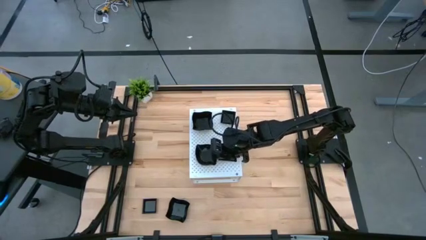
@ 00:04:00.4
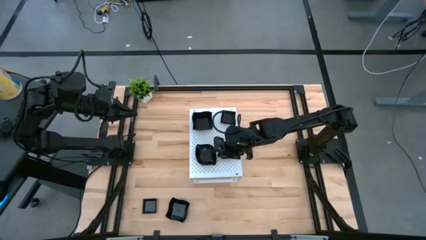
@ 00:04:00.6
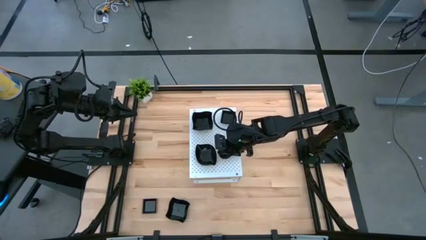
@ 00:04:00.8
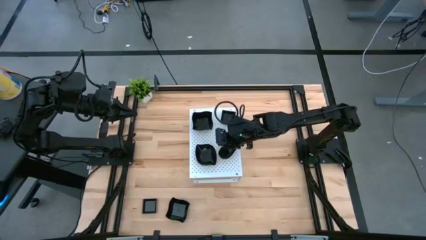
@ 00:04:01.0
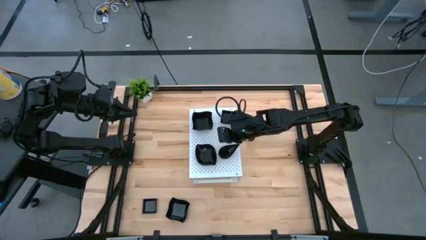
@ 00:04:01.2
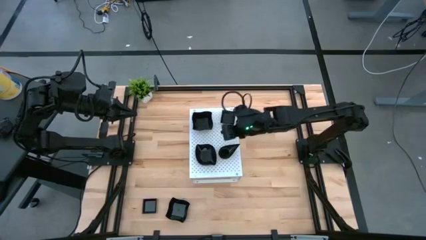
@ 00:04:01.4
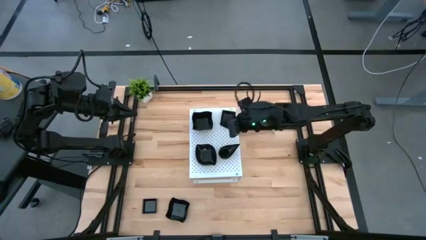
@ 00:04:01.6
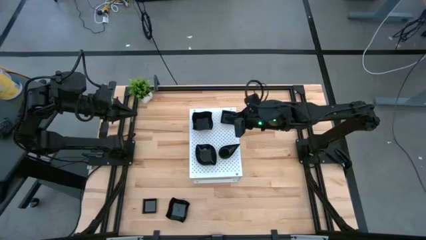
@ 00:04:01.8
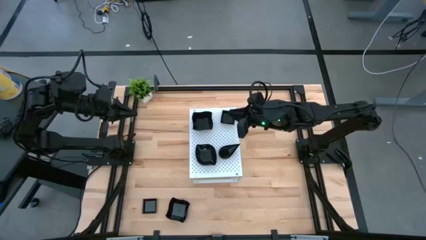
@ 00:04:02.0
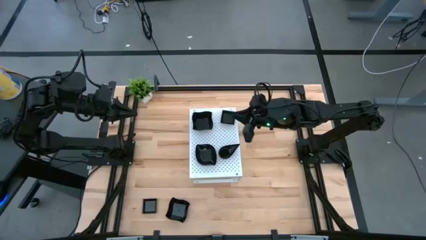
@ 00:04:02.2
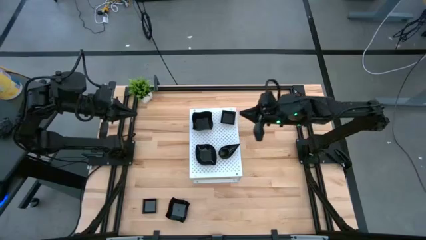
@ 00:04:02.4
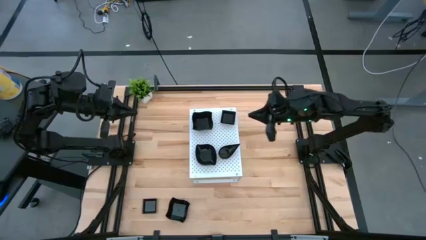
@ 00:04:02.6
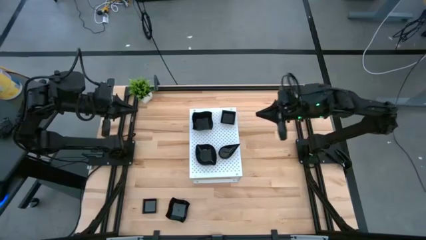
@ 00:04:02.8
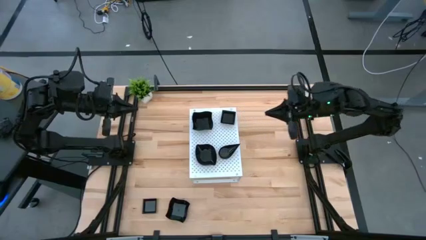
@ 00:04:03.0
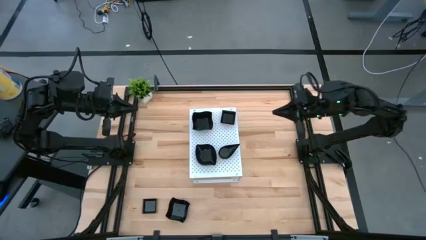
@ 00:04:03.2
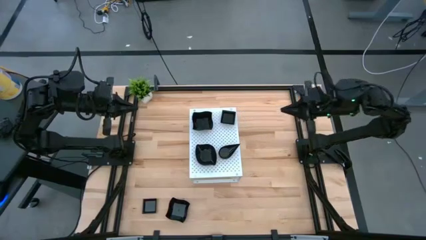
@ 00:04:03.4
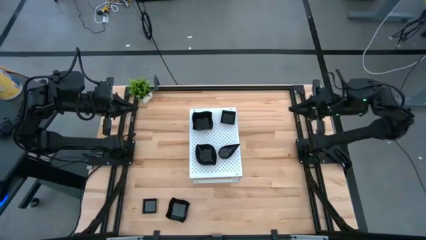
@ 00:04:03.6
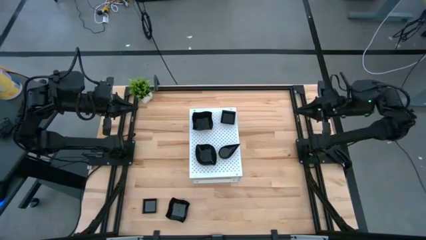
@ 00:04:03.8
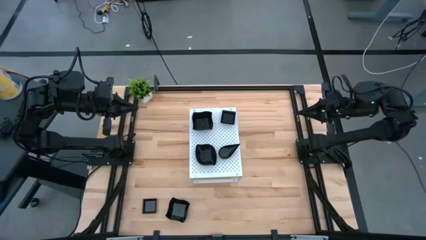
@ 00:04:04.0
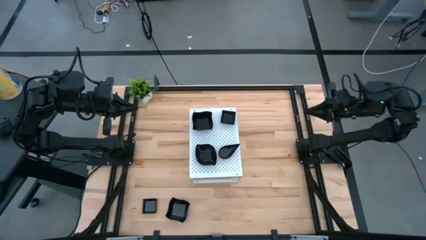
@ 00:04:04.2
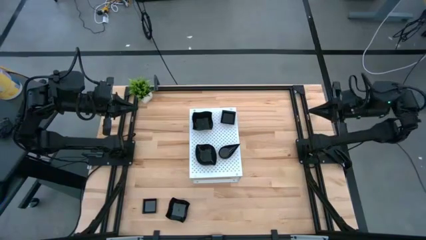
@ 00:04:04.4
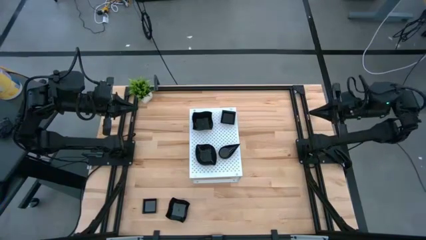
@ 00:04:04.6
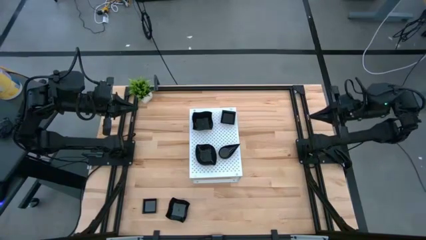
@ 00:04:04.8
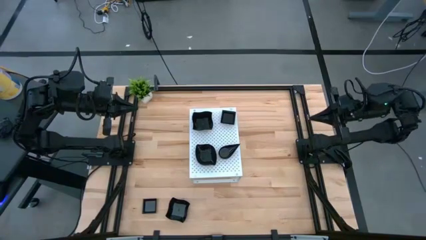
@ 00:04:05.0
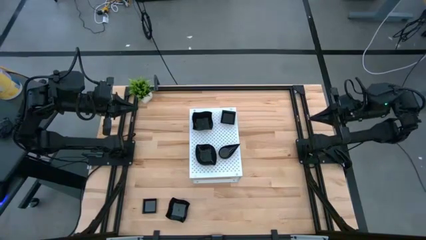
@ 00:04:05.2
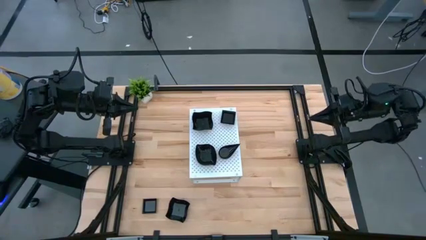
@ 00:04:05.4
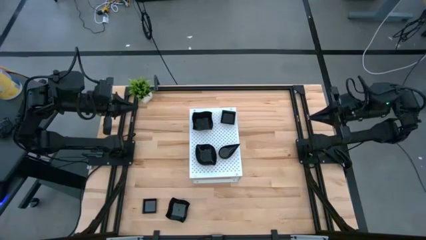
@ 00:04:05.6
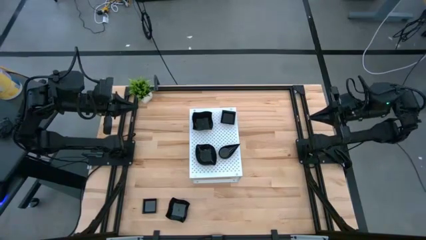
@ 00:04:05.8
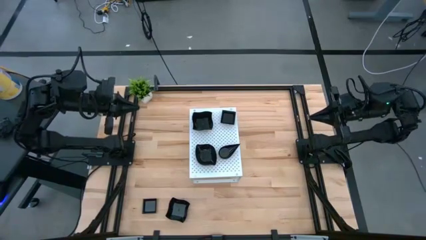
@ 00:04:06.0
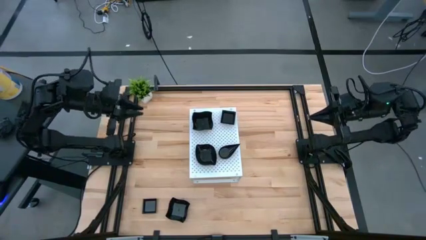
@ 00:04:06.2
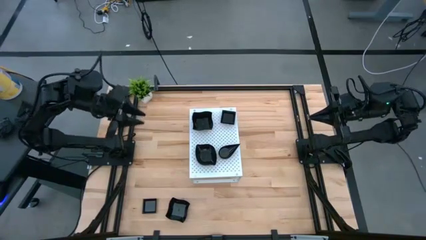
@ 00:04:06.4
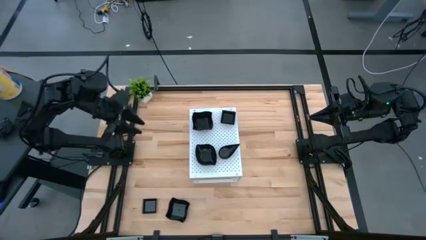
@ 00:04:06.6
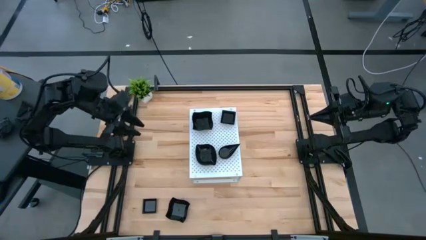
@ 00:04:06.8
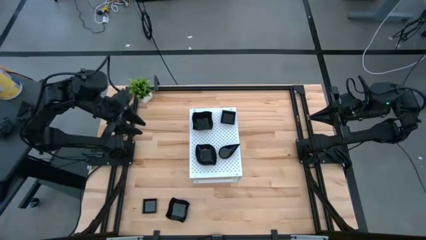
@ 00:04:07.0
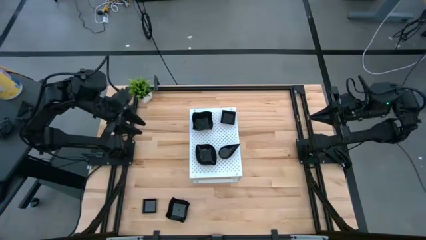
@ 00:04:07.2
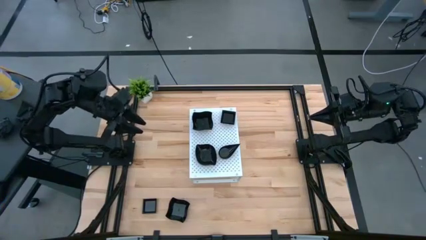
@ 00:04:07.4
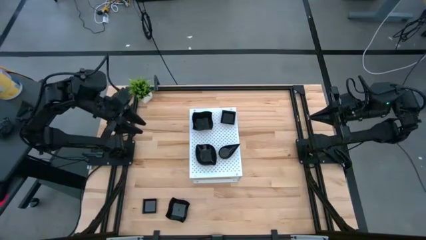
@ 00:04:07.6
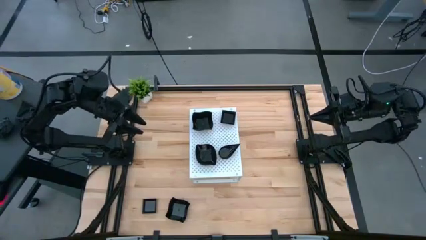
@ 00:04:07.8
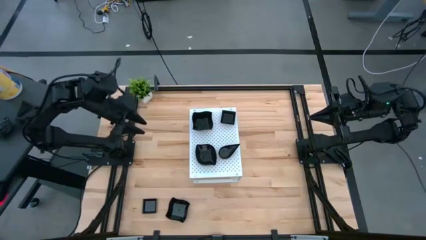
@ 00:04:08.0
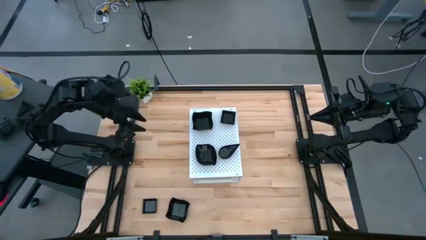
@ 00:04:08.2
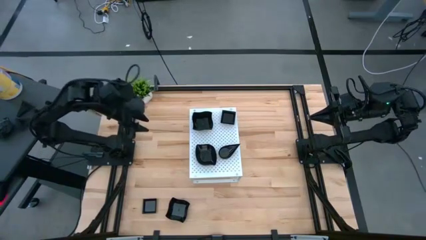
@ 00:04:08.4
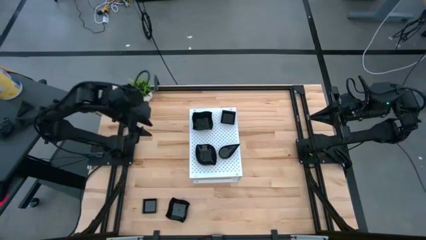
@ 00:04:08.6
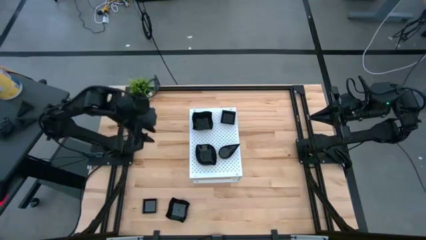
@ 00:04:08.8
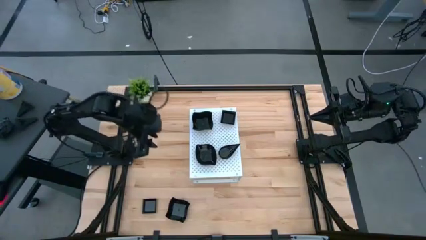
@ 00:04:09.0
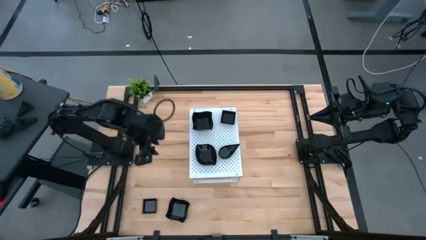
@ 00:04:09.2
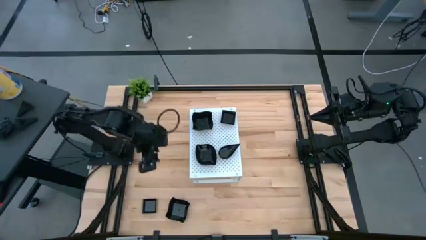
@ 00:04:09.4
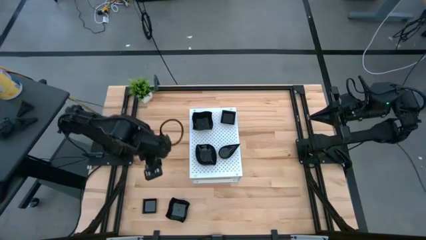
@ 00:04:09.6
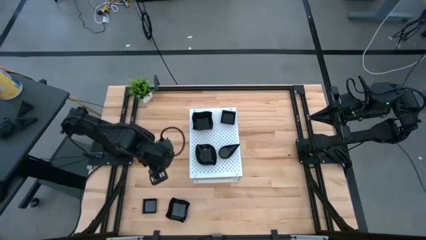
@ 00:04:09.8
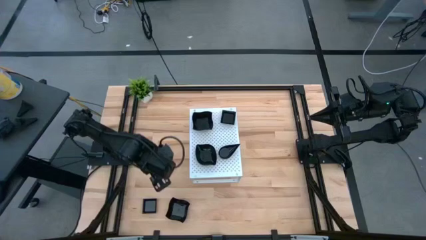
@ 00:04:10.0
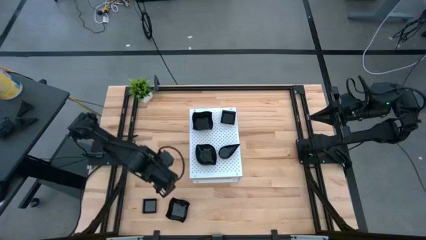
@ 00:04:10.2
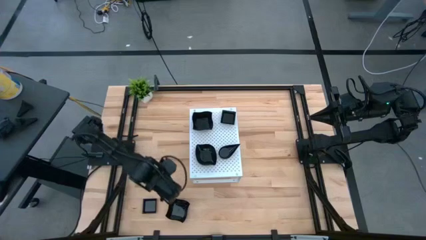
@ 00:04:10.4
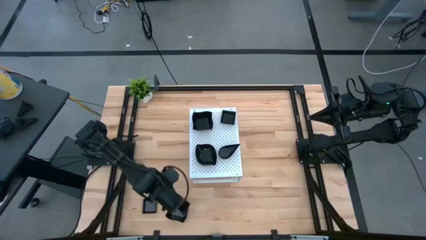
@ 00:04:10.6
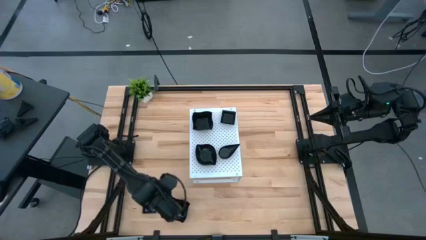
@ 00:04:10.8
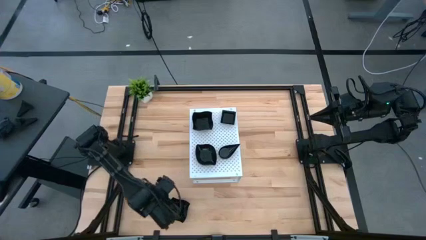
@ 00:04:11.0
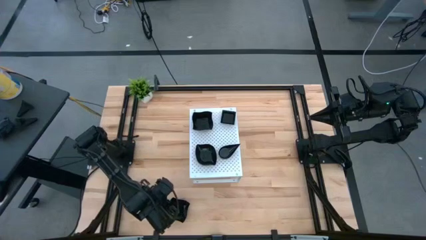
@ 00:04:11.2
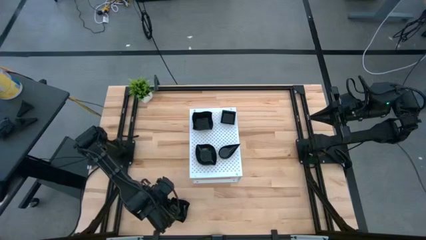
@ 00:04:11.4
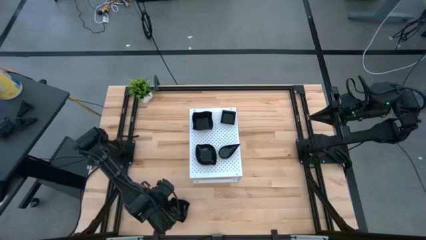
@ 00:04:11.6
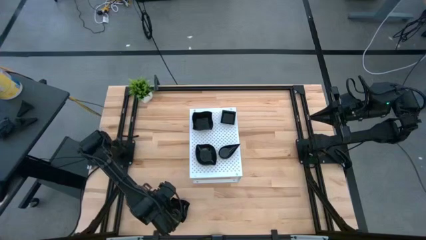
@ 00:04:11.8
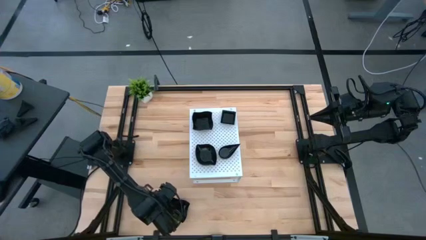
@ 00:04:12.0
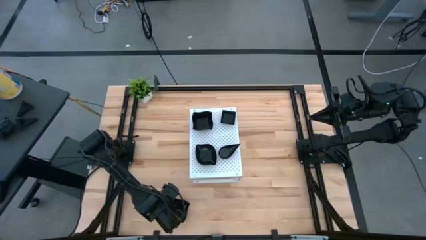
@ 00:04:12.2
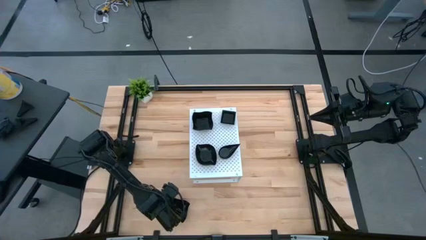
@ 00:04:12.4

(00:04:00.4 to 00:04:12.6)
Task: Pick & Place Mini shaped plates
Stack the black distorted square plate on top of the other black distorted square plate on the shelf
